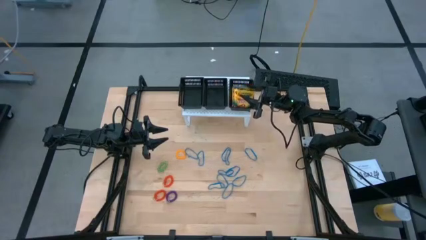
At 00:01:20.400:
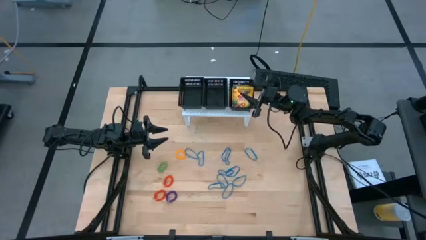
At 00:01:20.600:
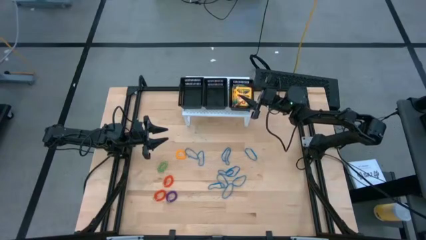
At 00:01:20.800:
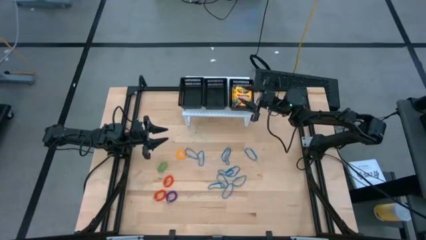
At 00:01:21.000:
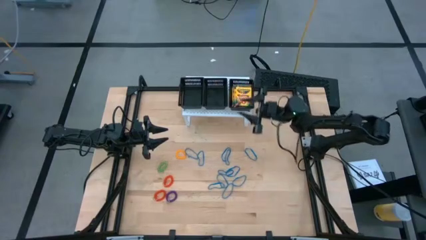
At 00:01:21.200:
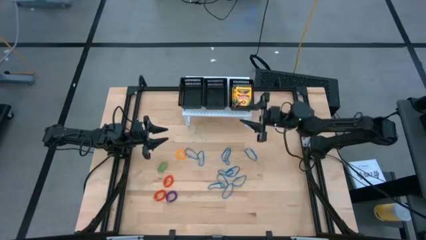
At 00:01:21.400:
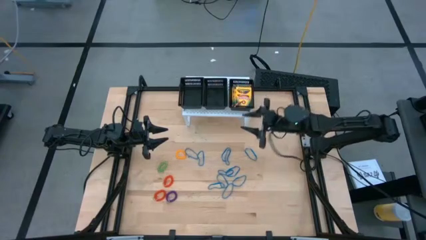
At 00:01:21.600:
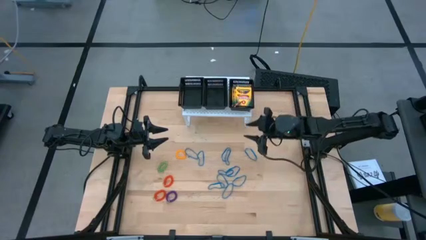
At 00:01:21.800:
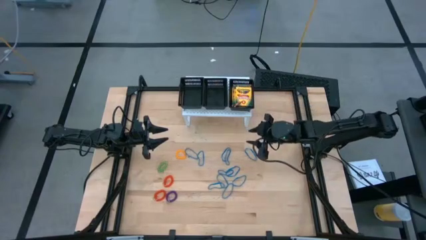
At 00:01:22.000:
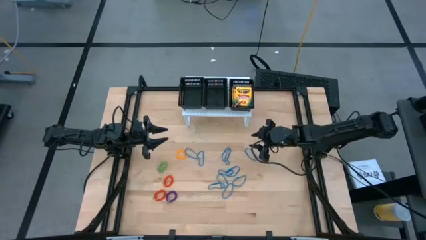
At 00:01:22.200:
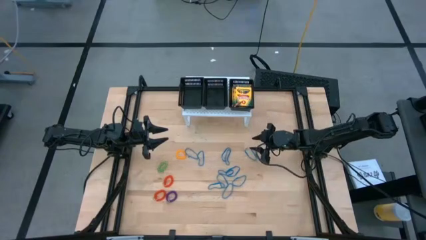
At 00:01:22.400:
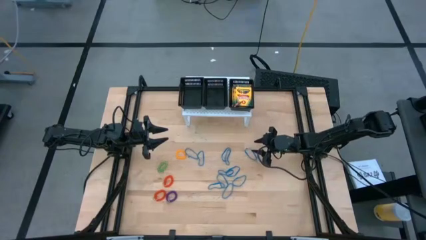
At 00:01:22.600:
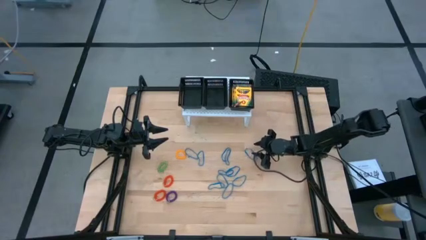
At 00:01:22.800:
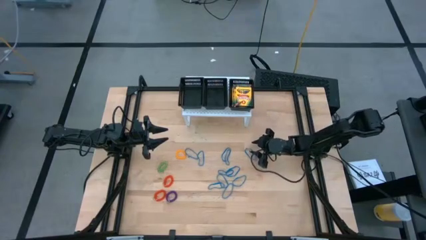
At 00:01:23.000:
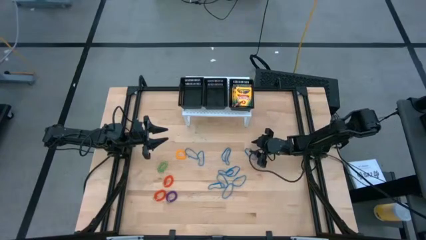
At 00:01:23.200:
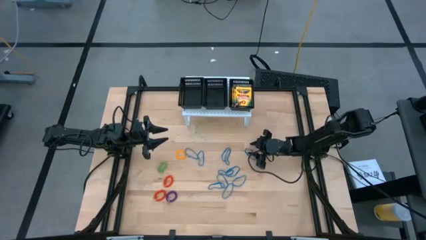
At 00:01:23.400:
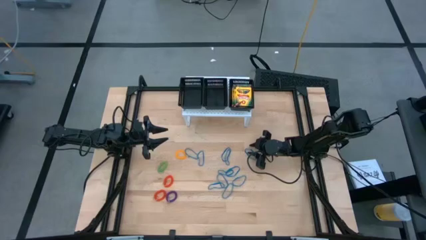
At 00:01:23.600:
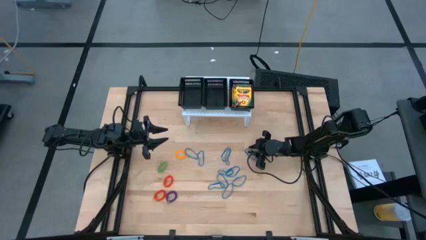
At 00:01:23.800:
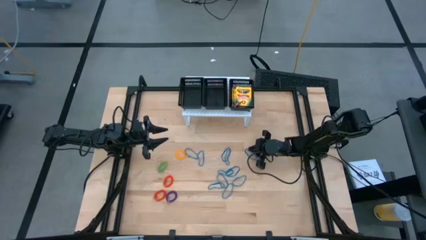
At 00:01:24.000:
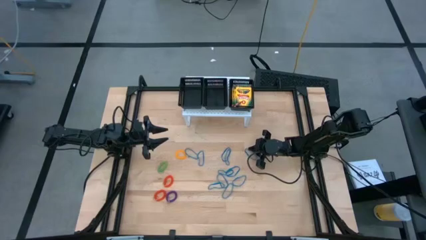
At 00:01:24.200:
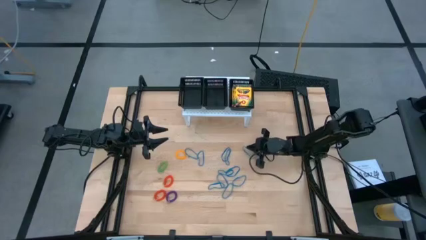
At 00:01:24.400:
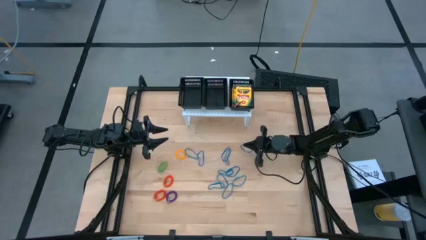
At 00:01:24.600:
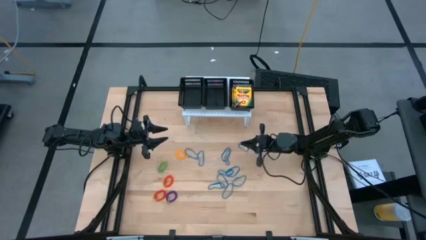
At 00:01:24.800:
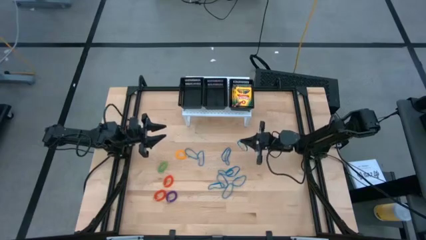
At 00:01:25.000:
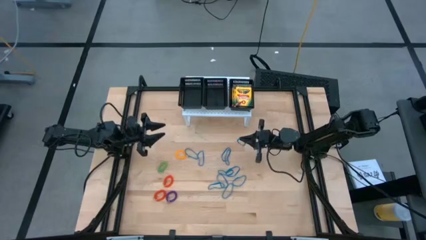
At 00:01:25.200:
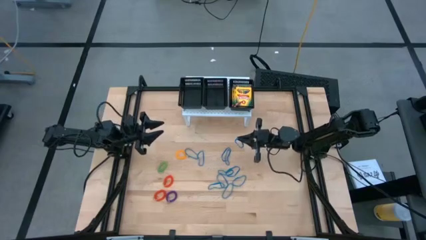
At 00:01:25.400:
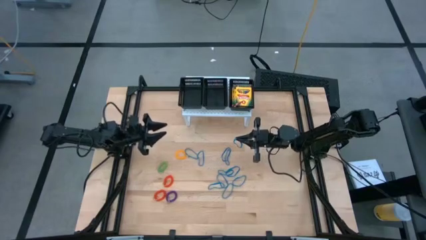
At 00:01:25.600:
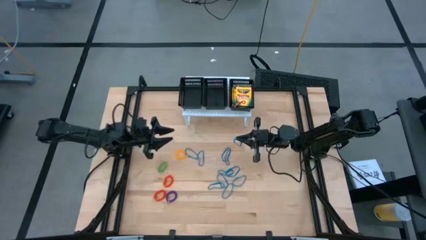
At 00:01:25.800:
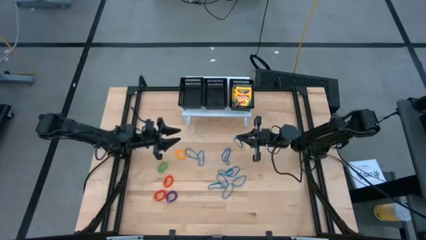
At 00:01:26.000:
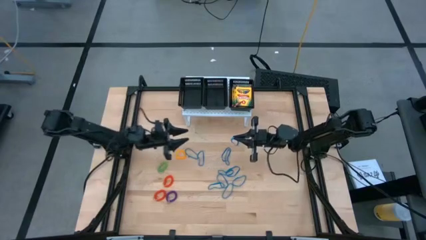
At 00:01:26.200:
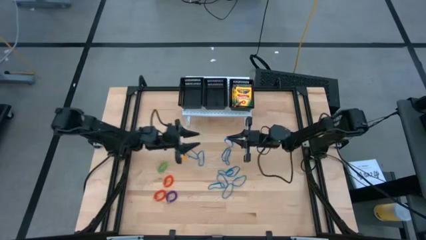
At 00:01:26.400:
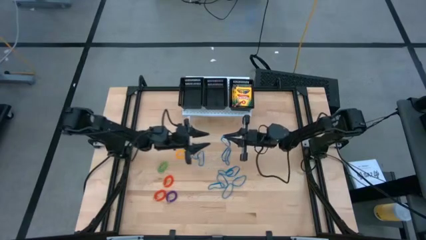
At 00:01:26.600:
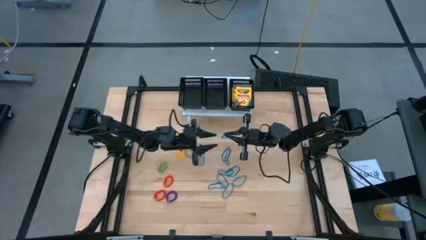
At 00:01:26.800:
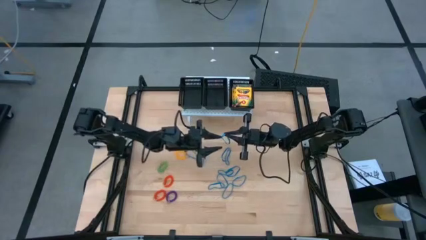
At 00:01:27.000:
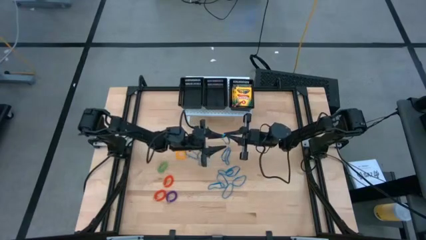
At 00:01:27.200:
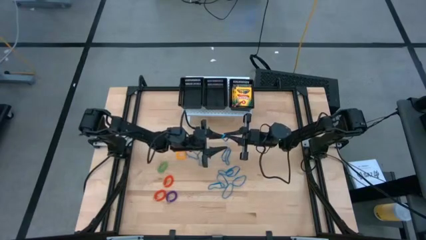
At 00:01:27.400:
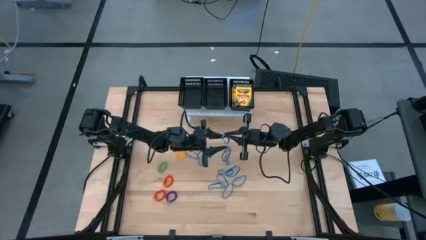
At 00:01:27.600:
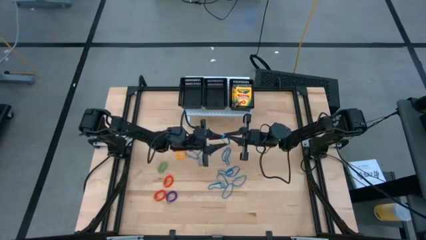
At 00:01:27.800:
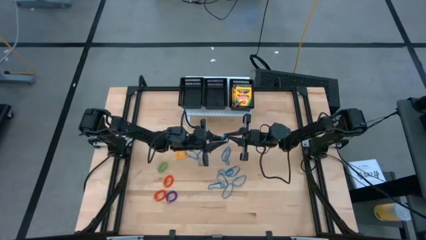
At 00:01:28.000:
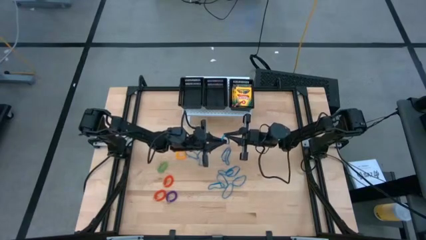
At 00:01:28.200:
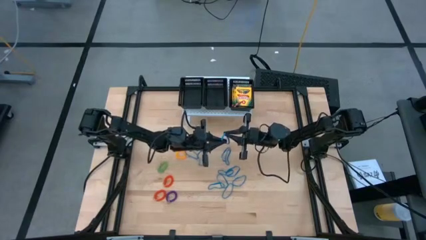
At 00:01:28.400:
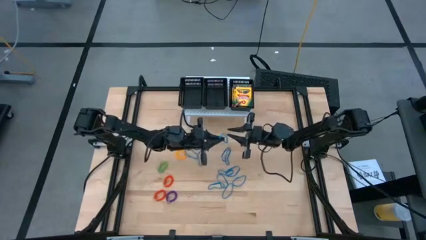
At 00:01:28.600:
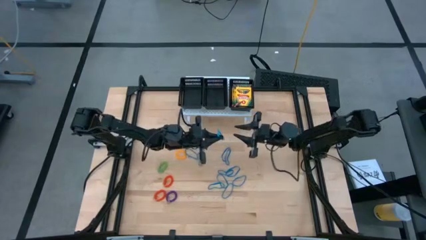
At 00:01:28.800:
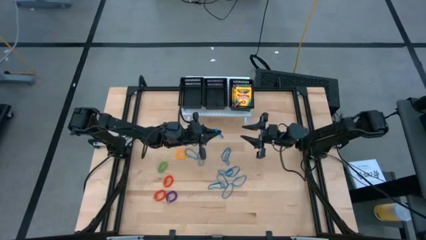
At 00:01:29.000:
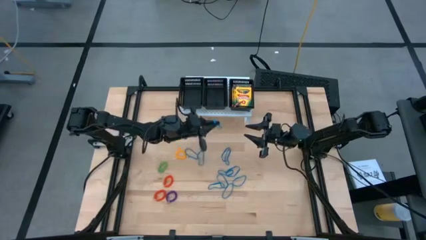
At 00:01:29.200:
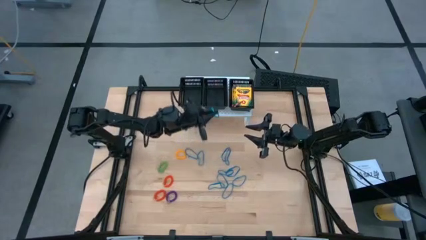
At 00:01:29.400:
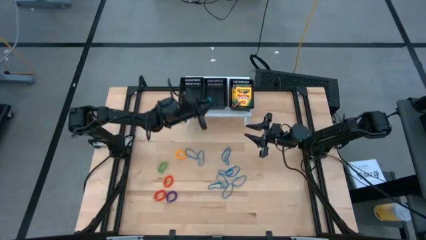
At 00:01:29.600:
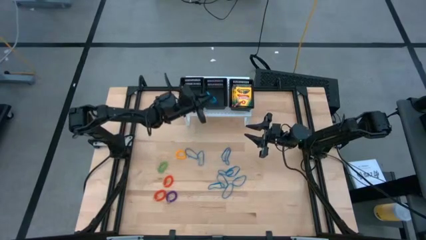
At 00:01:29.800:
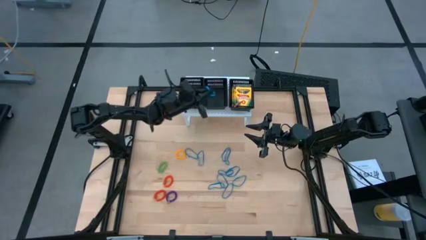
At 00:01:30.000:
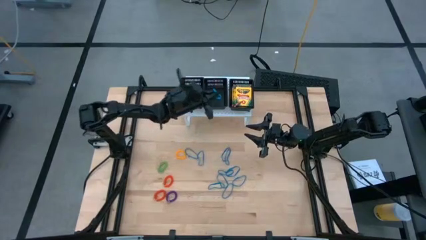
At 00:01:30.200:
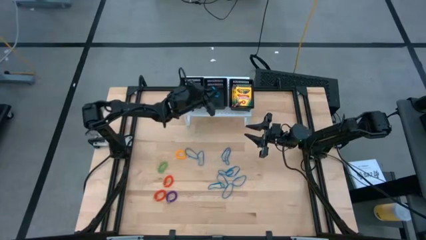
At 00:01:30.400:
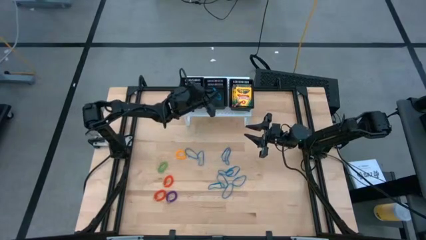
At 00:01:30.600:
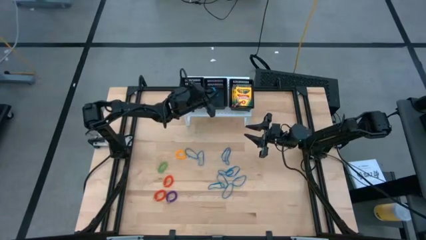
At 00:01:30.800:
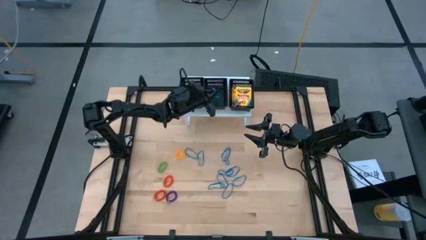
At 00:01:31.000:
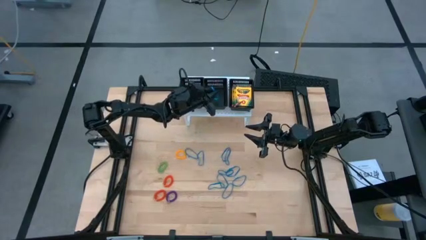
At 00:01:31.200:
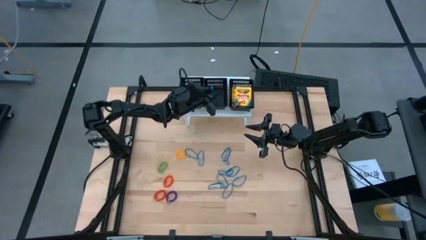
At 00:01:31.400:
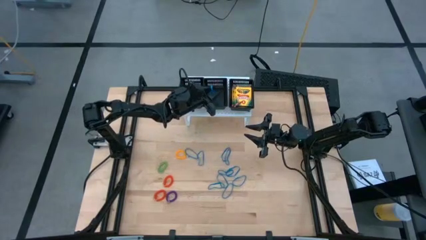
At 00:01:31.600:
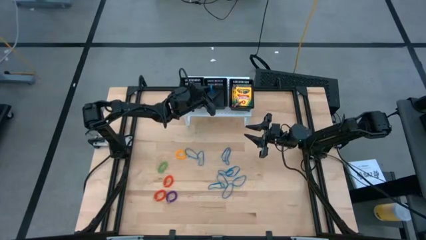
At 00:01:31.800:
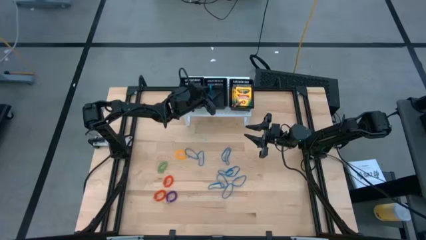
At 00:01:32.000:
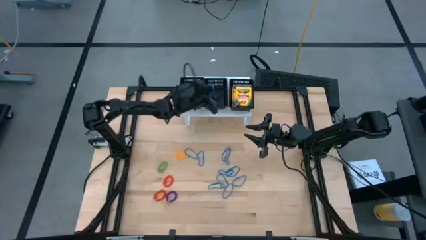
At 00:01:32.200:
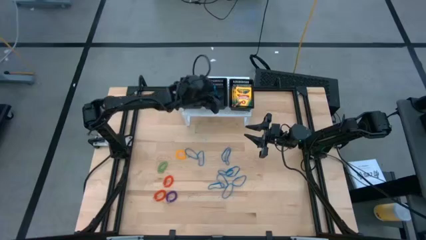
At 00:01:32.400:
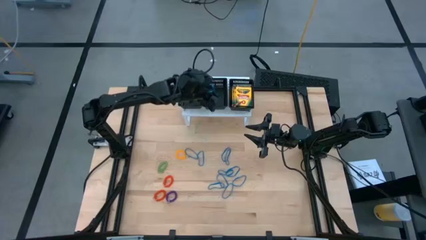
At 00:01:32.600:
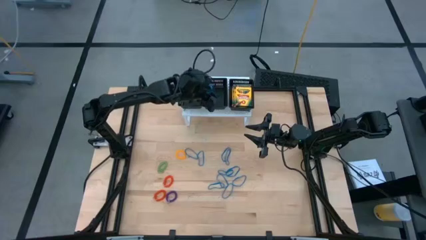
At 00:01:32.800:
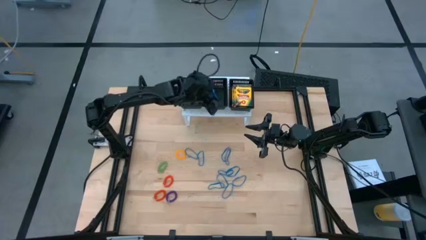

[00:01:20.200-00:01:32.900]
Task: Pick & Place Office Desk Supplies
Put the blue rubber band into the middle black bin
